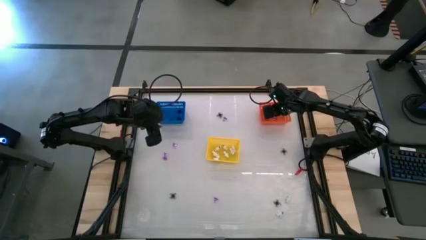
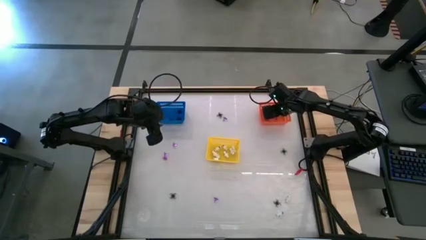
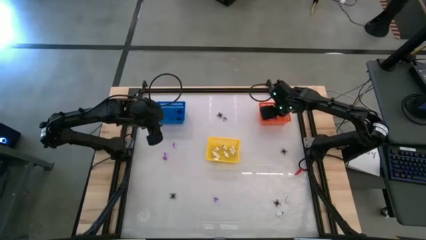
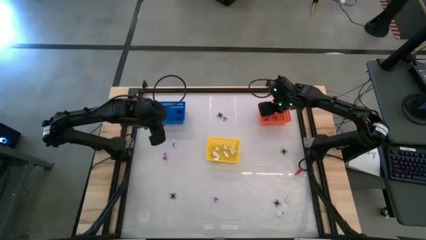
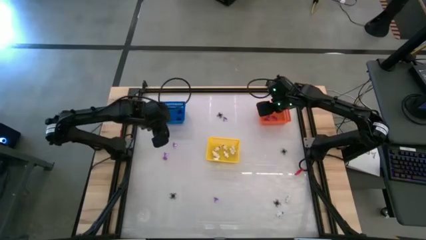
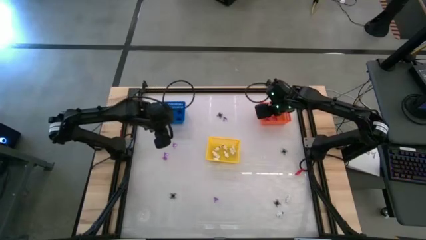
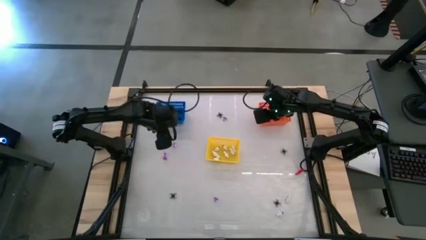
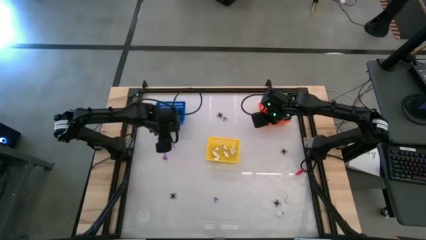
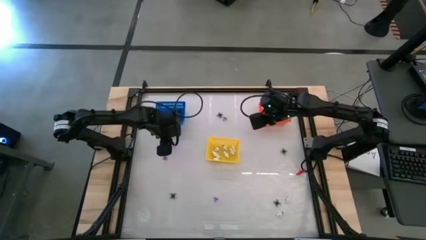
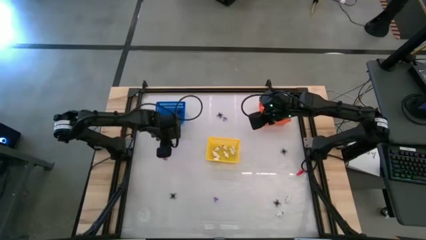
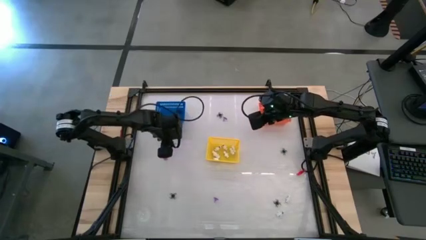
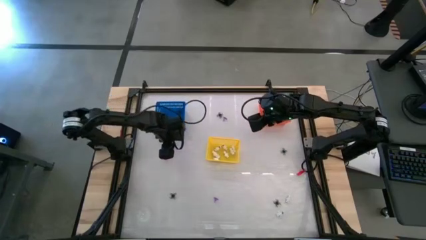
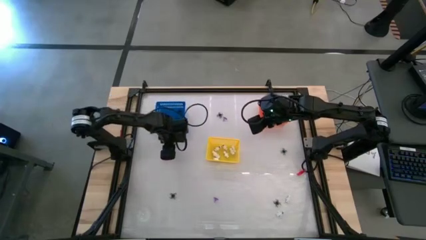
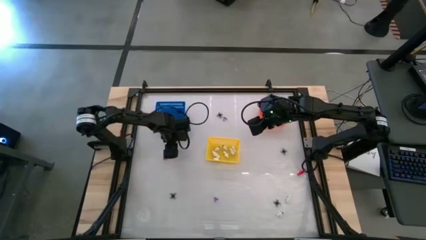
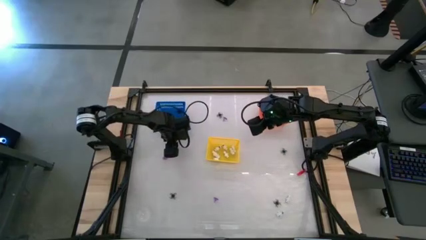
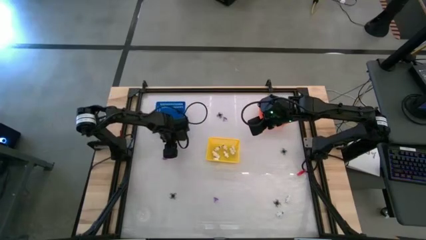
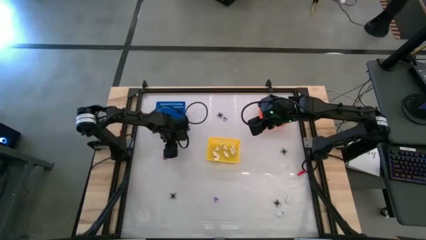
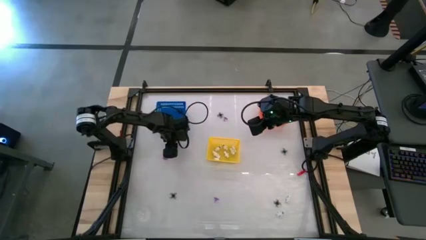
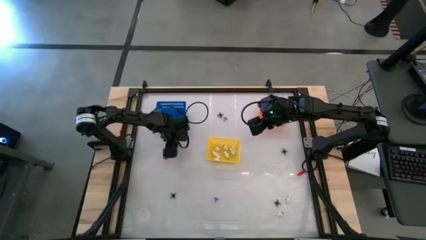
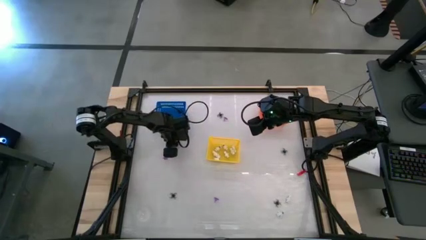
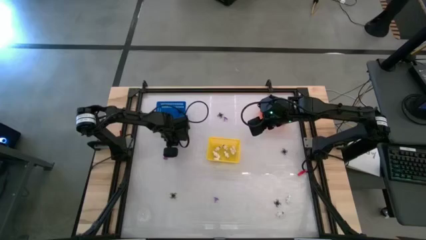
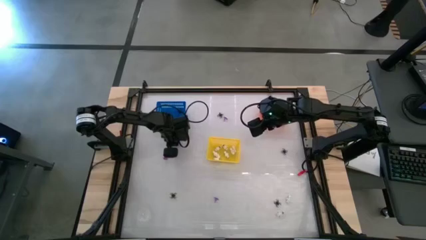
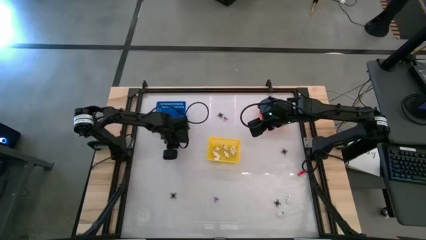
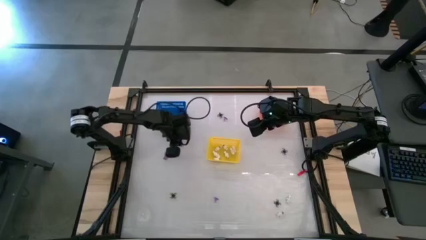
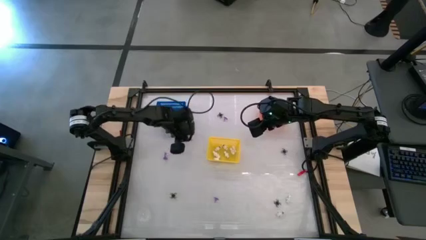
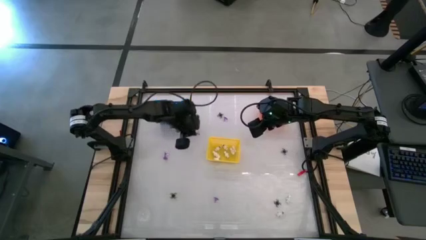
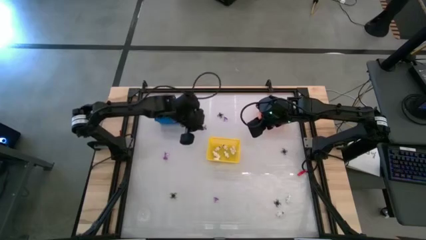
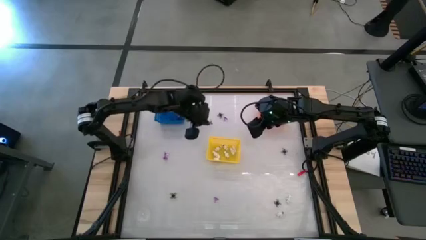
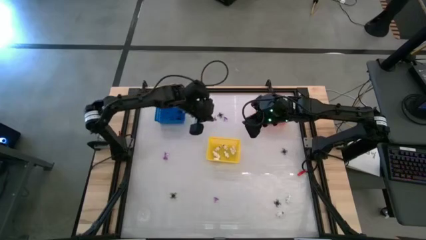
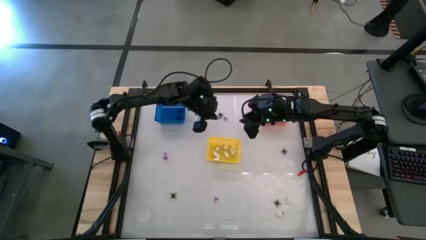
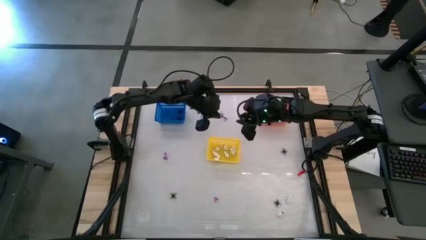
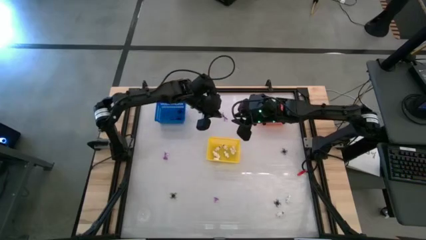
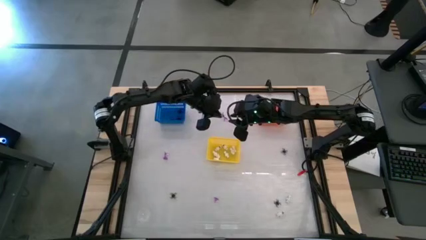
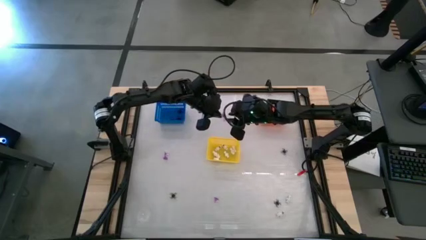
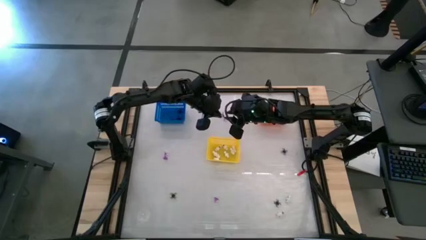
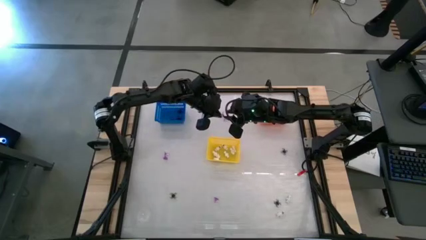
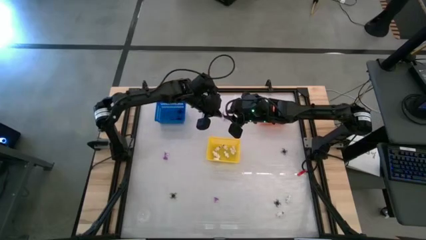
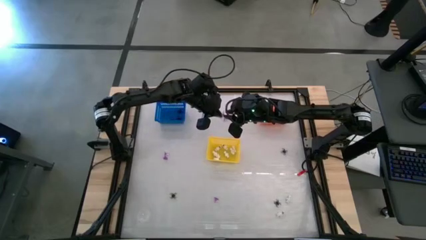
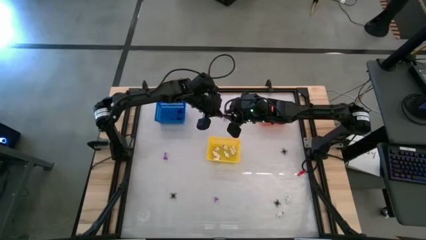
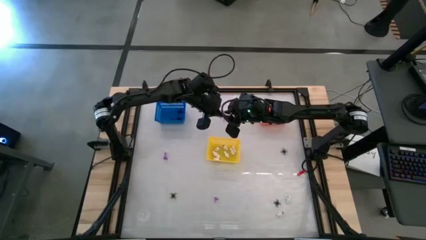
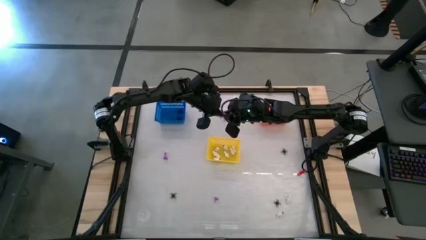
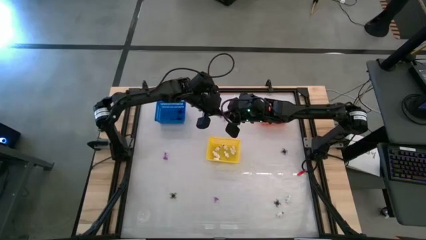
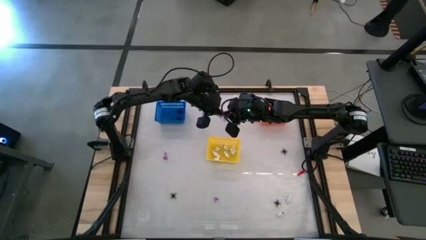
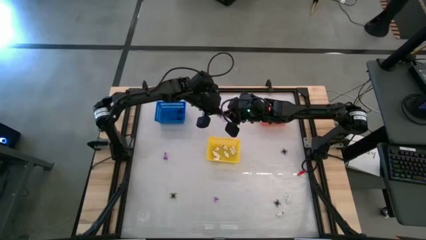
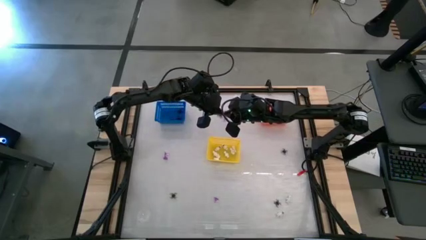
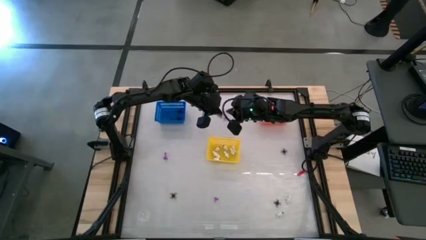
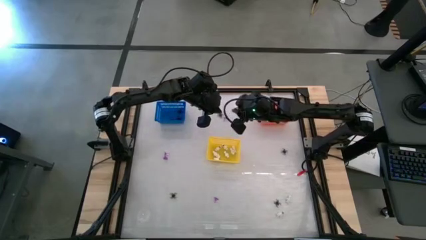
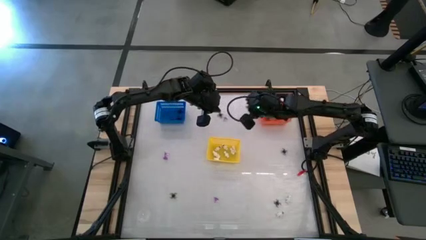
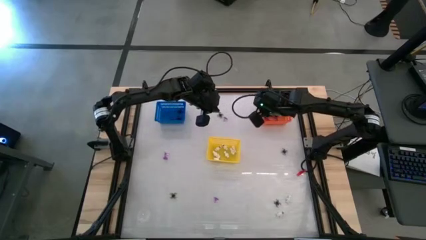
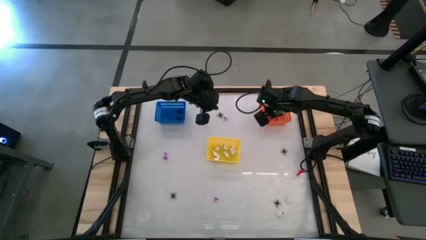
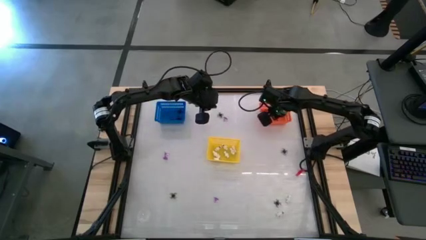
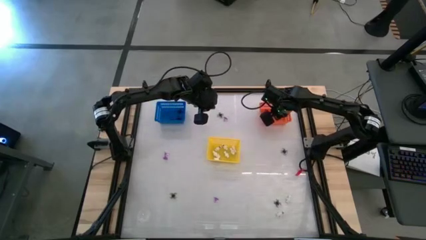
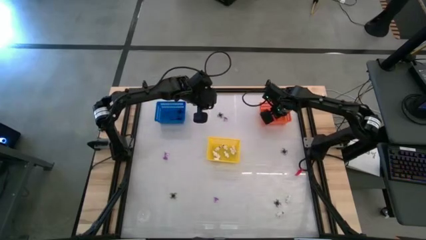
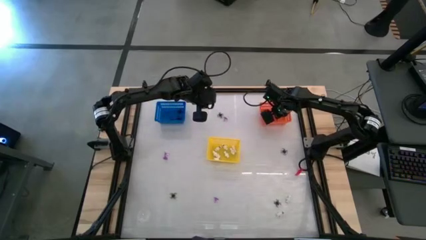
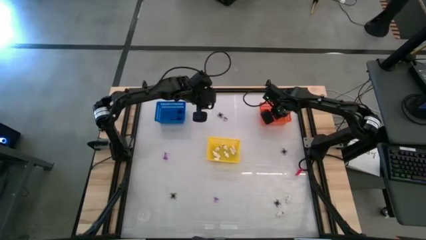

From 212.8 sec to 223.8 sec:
Task: Sort Halloween decoration
Put the purple witch hat toy into the orange bin

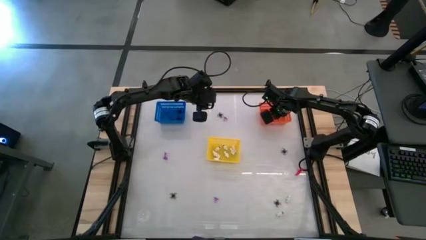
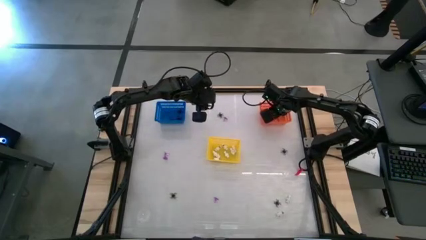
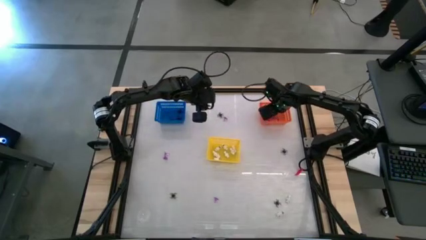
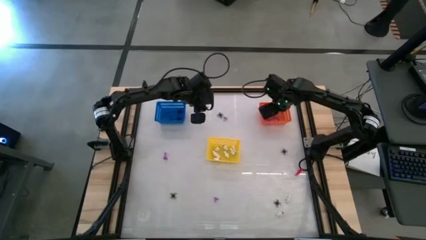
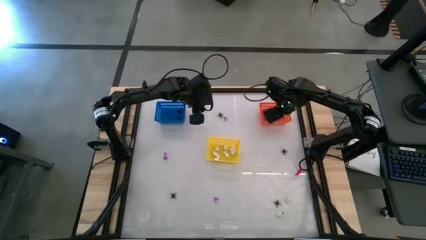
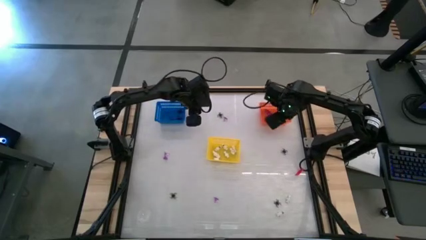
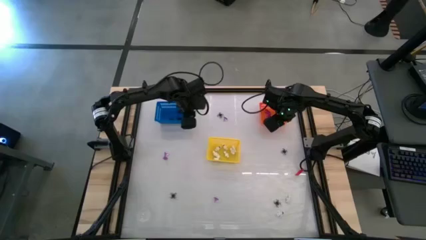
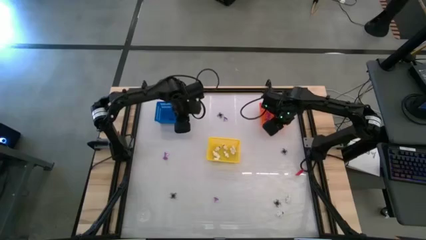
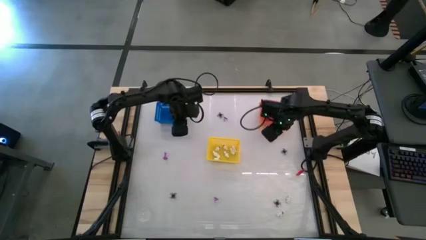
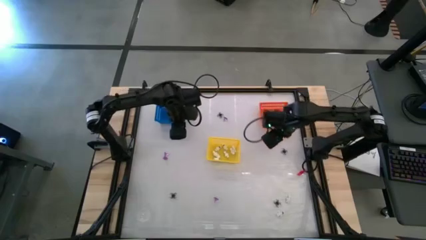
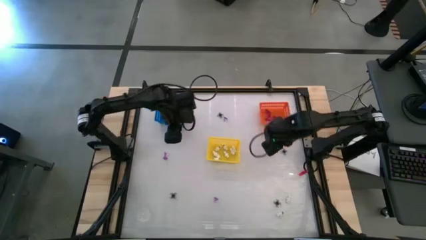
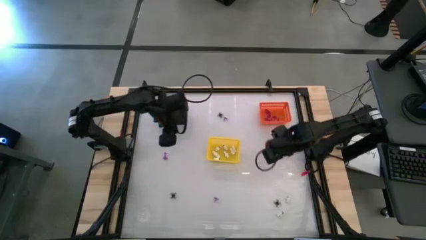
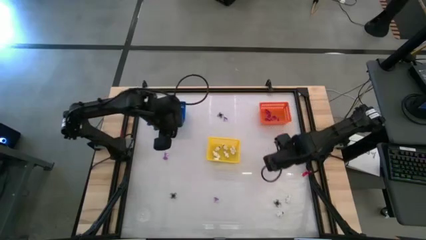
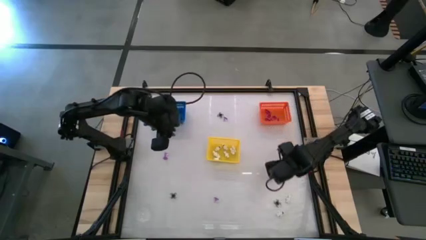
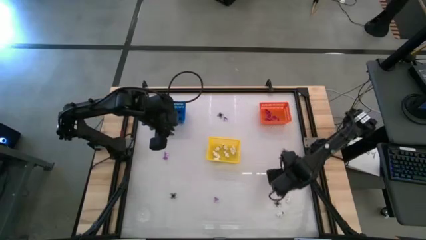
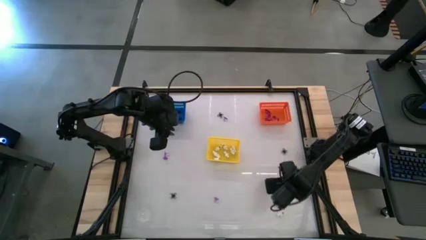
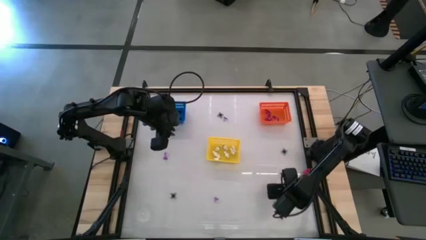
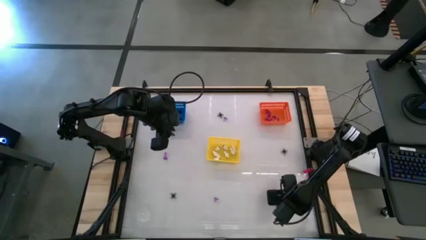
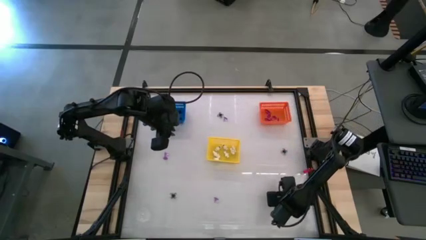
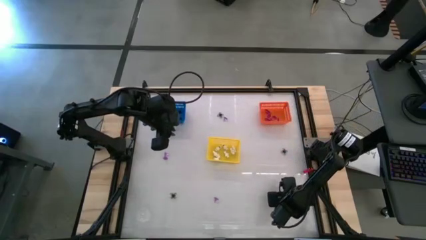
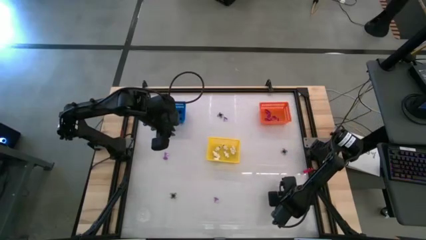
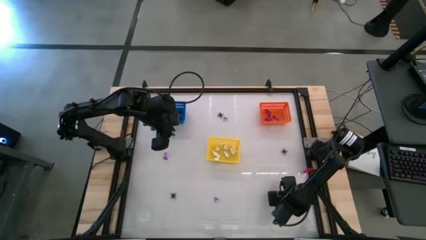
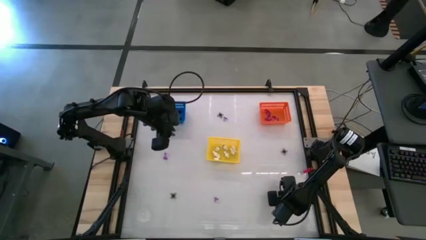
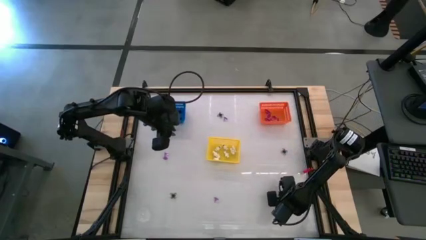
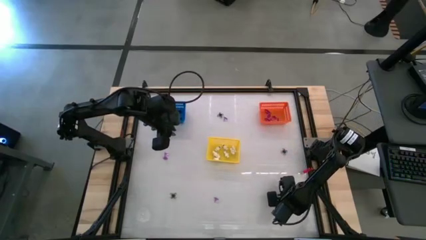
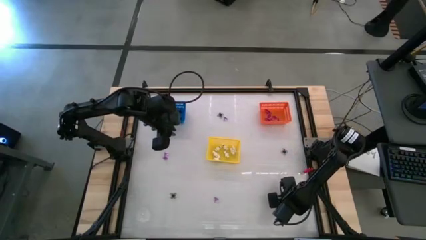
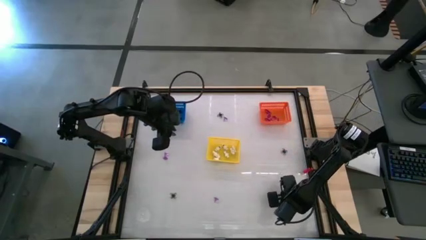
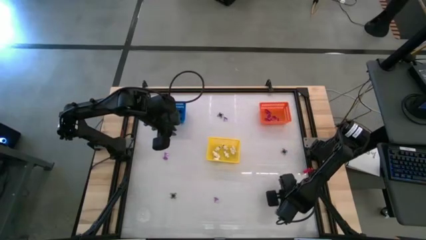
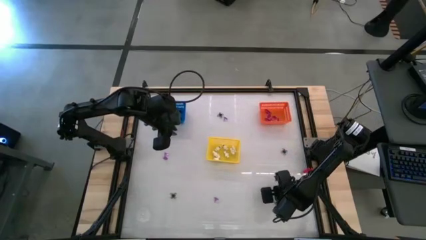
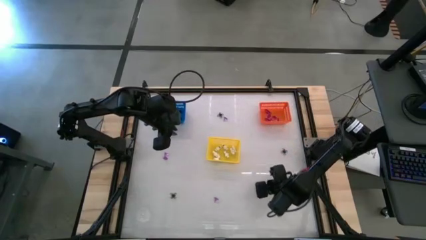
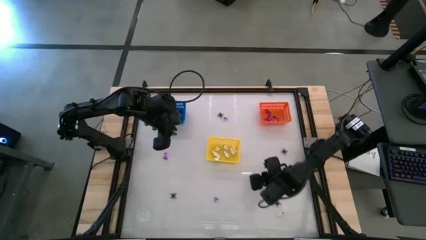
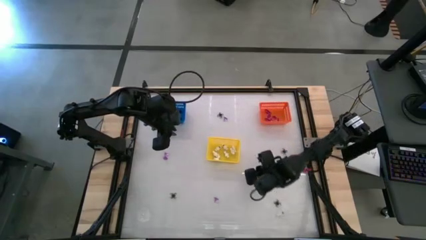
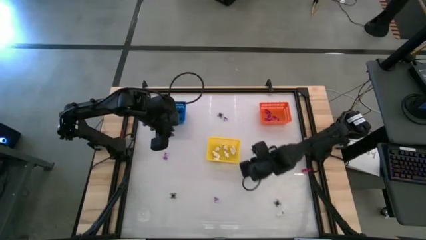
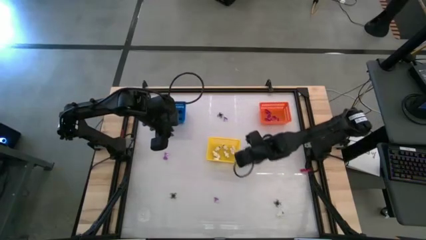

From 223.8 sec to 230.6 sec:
Put the white skeleton toy into the yellow bin
